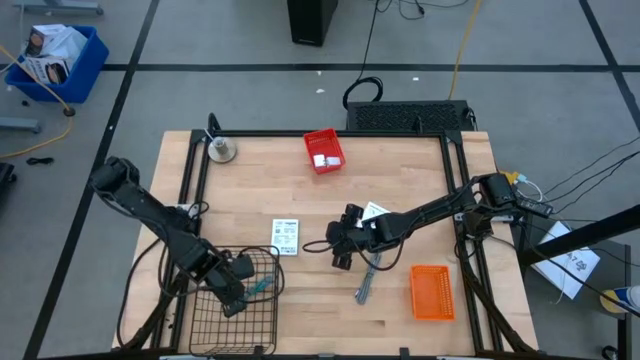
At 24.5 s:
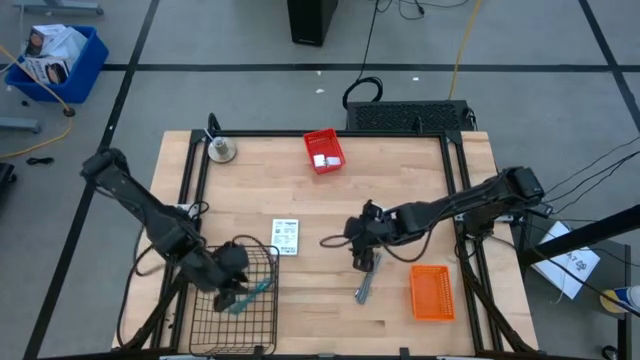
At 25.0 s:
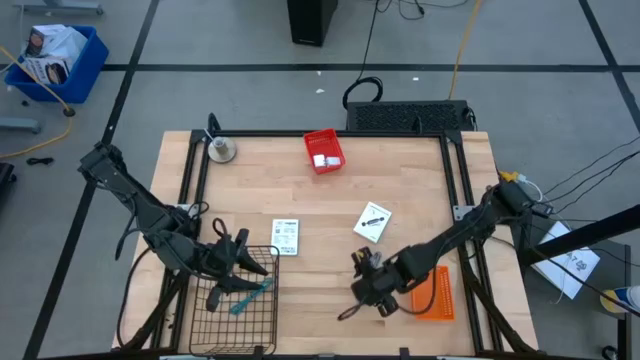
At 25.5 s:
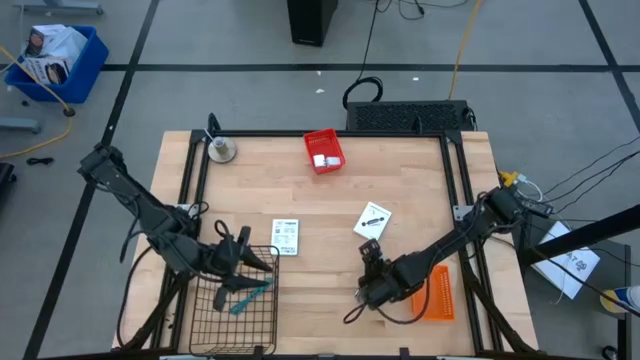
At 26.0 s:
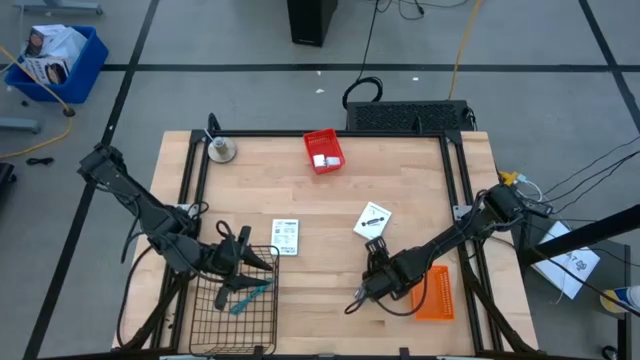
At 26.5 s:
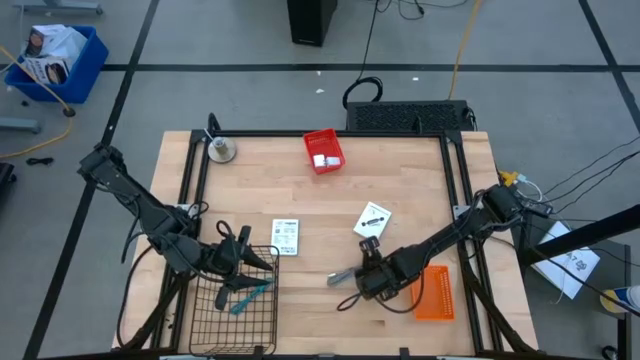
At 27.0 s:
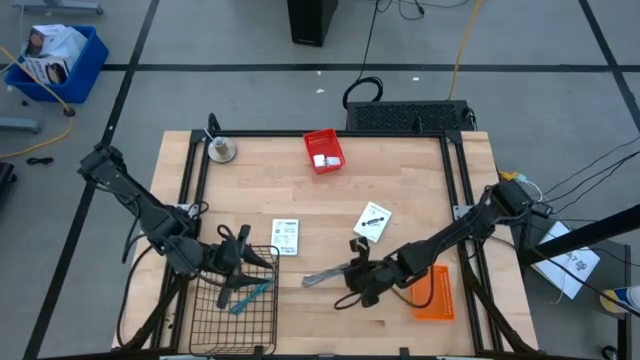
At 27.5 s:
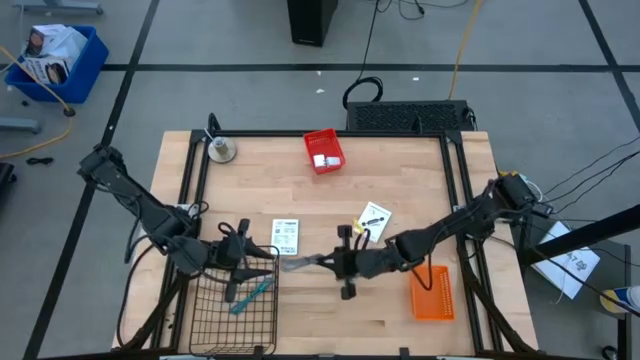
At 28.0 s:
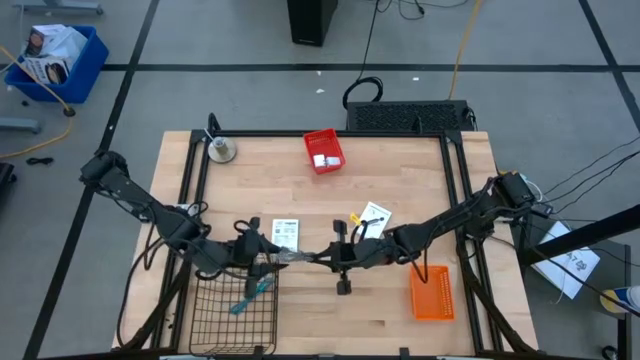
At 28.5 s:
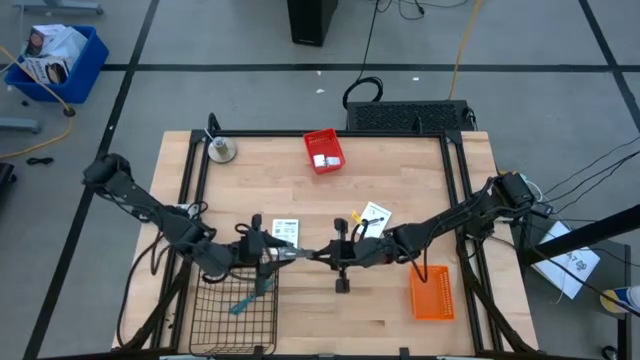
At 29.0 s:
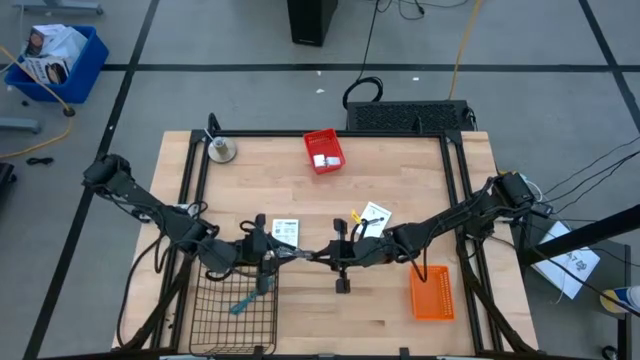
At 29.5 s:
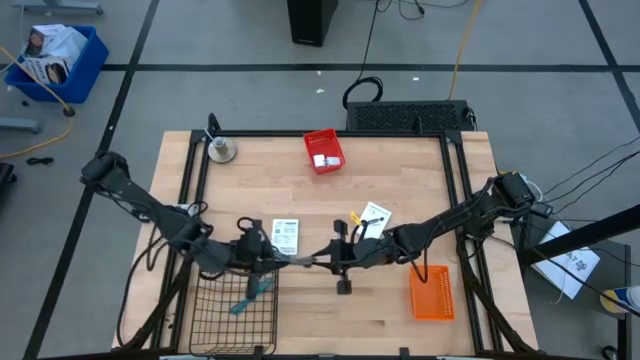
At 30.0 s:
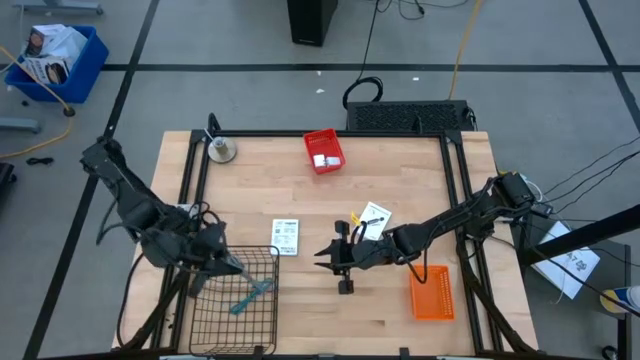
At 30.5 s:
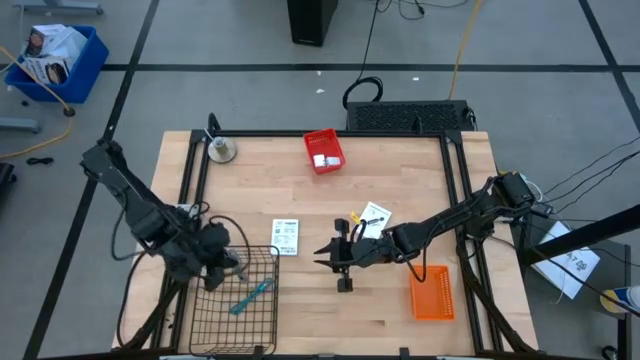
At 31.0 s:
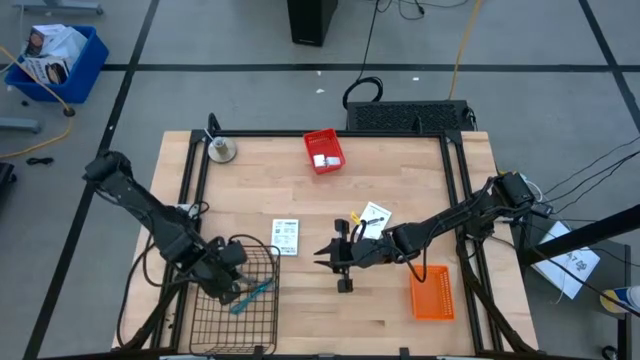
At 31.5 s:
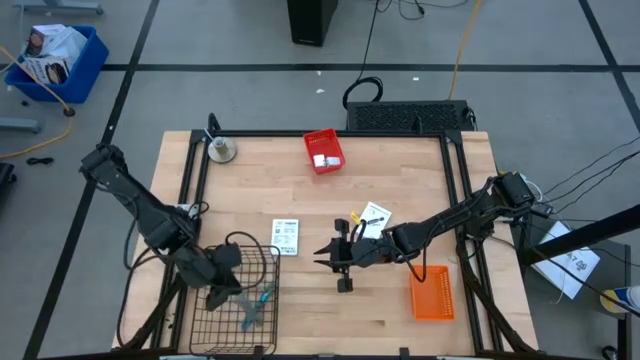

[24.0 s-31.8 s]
Task: Pick and place items into bin
Put the black stripes charger cable into the wire basket

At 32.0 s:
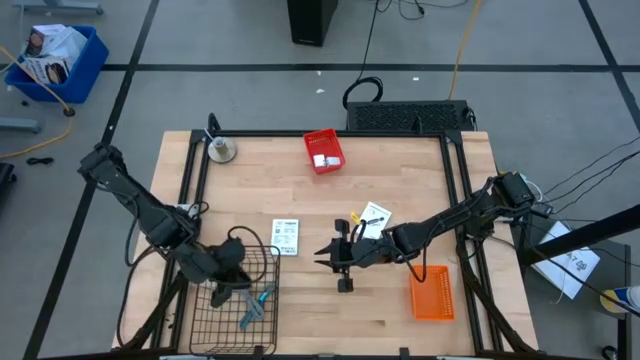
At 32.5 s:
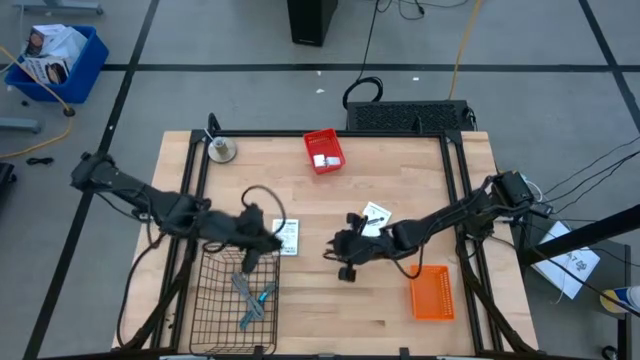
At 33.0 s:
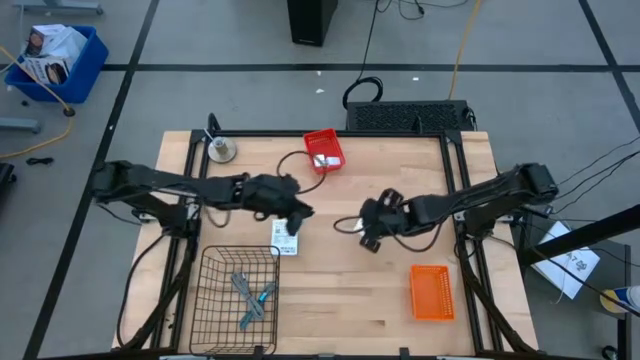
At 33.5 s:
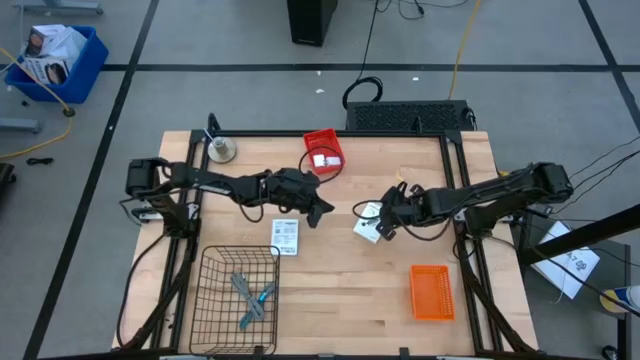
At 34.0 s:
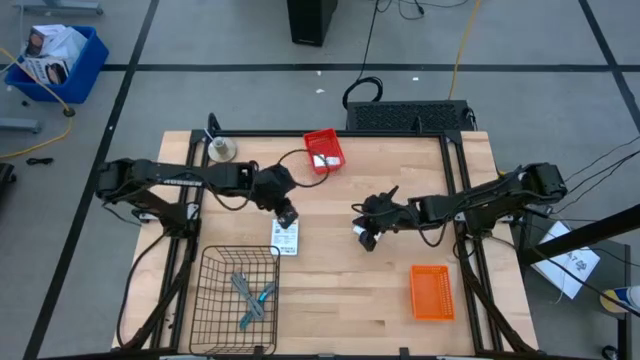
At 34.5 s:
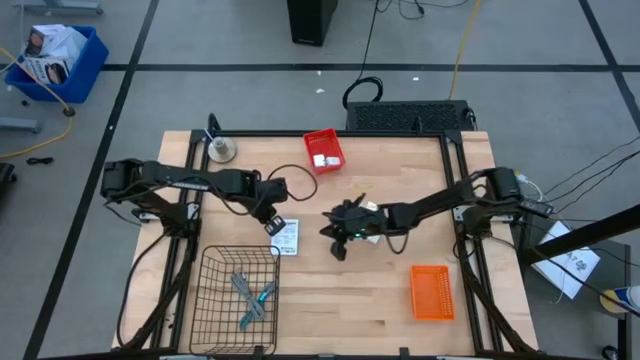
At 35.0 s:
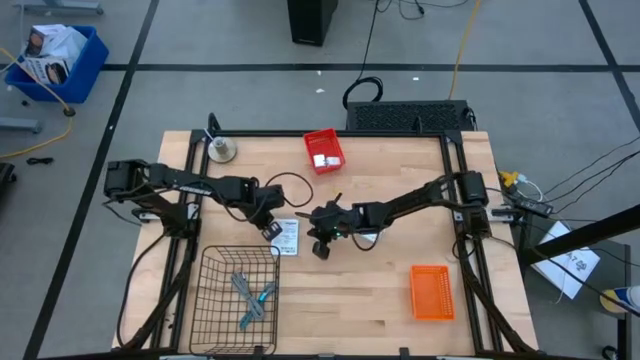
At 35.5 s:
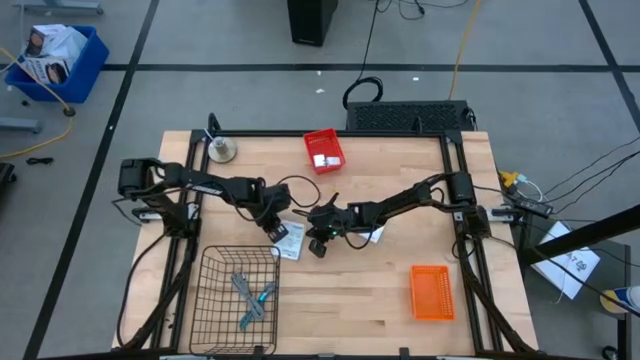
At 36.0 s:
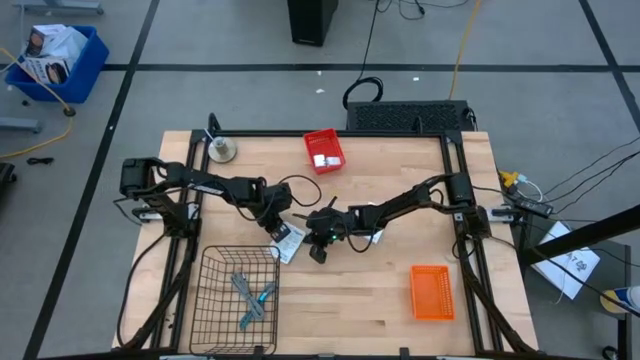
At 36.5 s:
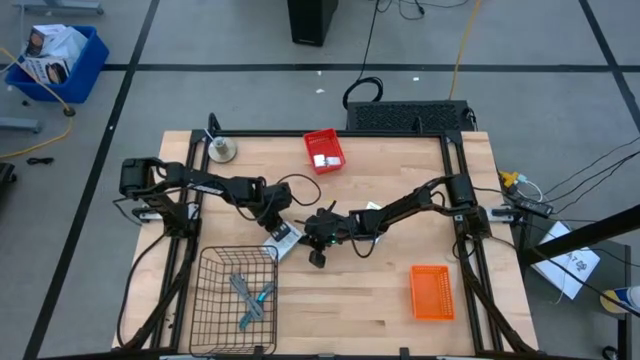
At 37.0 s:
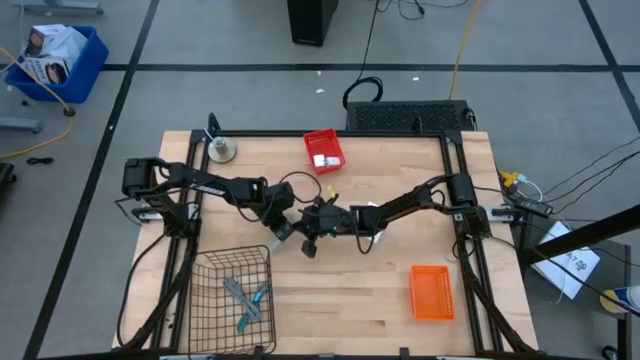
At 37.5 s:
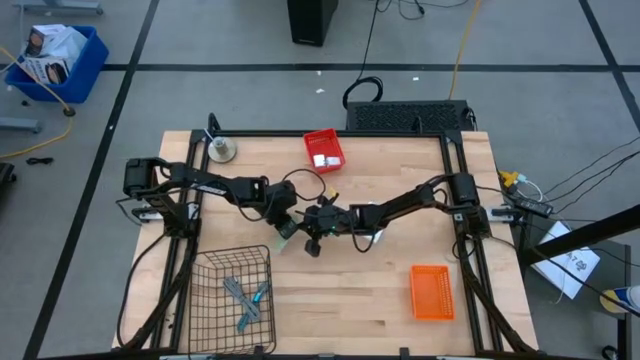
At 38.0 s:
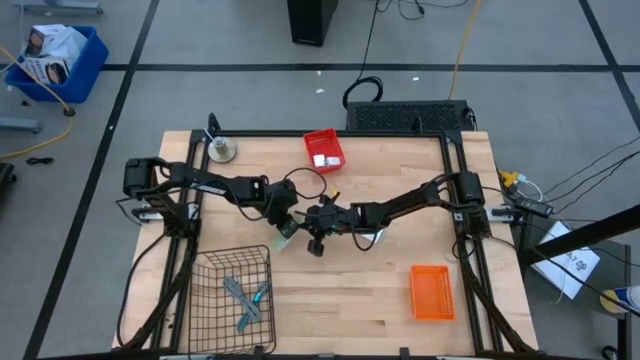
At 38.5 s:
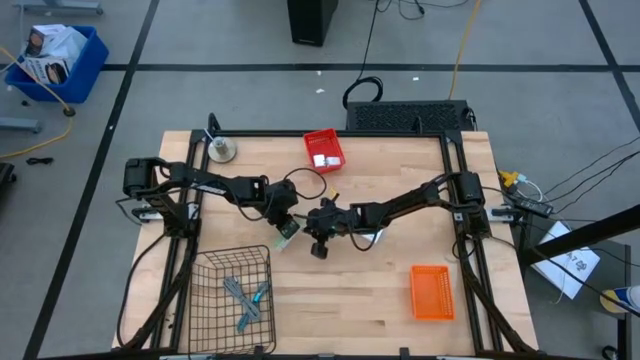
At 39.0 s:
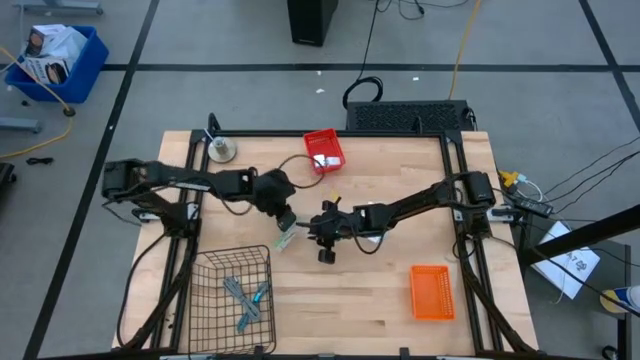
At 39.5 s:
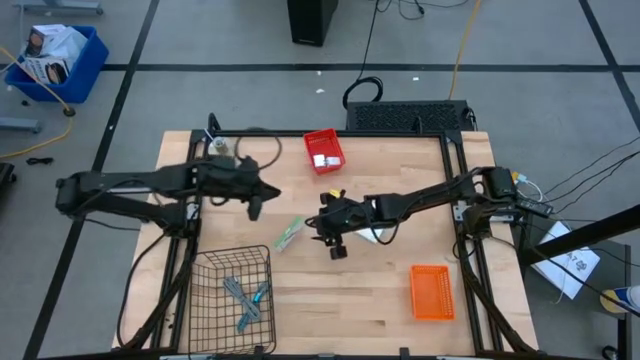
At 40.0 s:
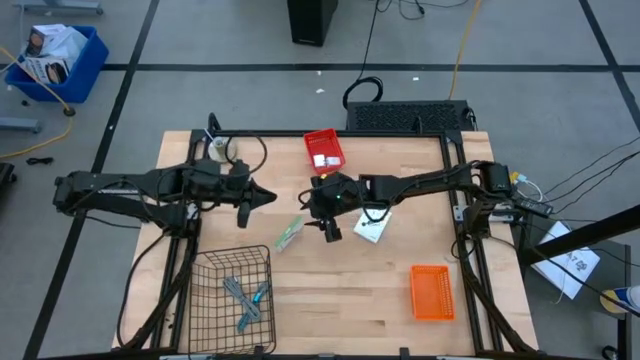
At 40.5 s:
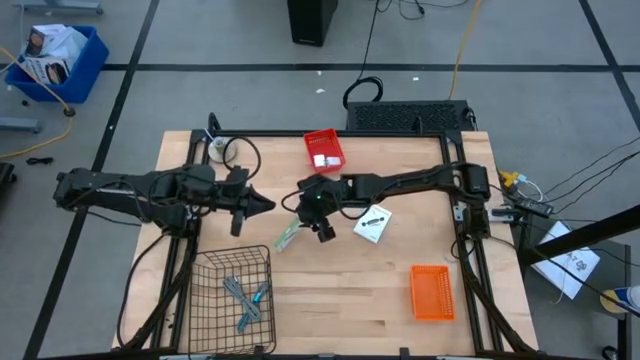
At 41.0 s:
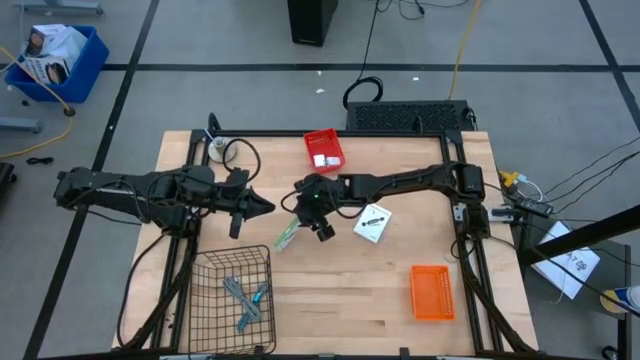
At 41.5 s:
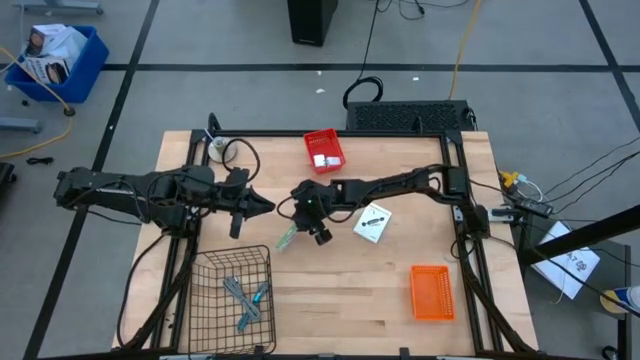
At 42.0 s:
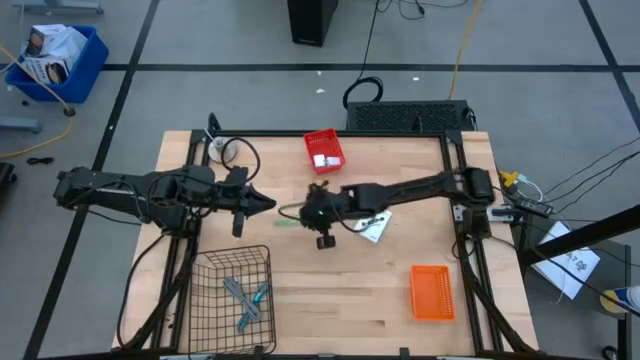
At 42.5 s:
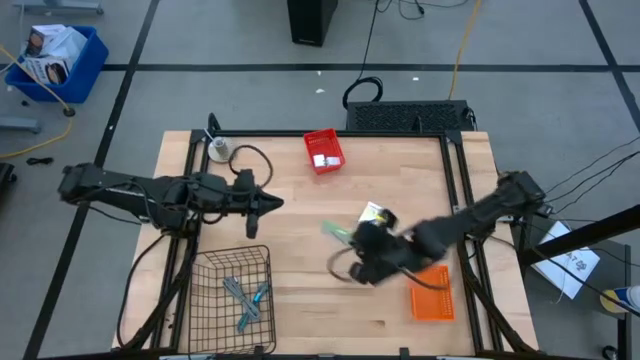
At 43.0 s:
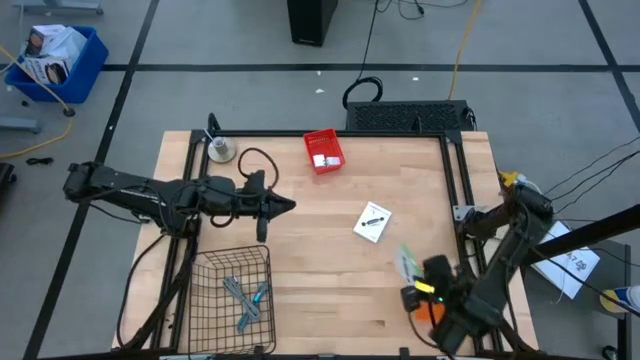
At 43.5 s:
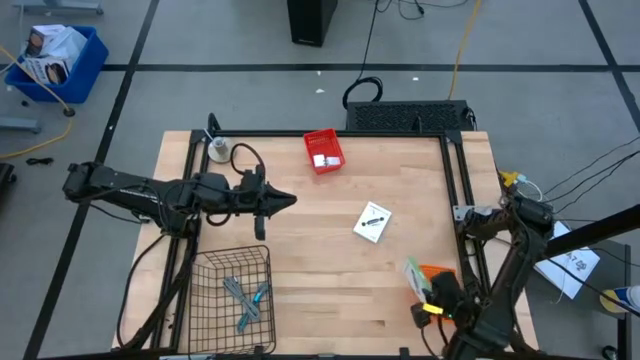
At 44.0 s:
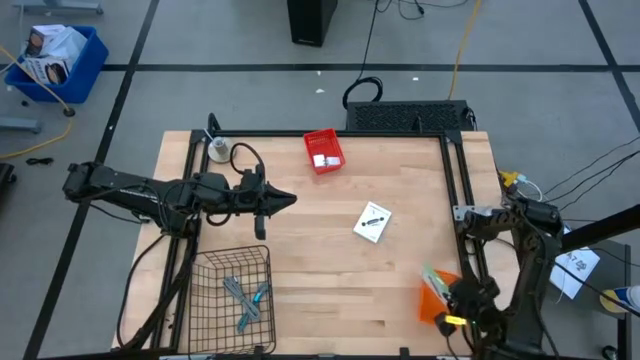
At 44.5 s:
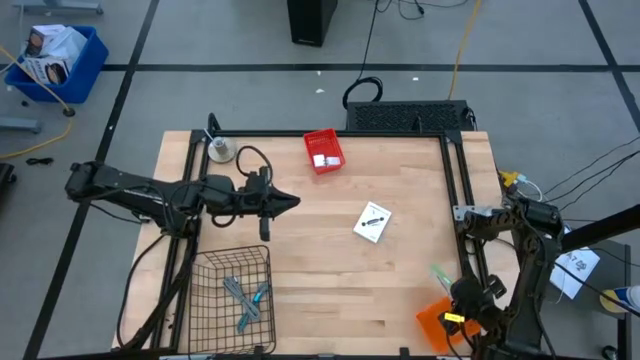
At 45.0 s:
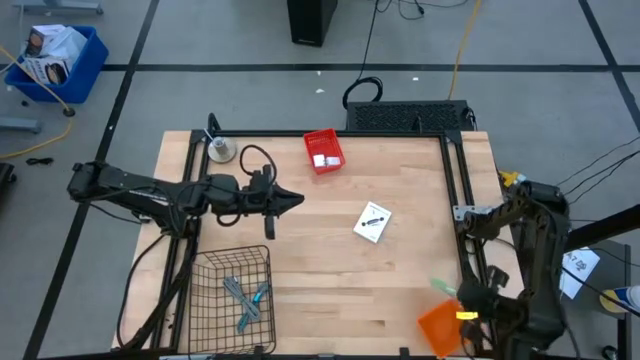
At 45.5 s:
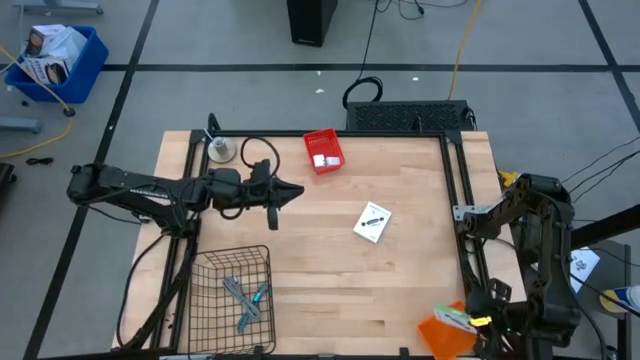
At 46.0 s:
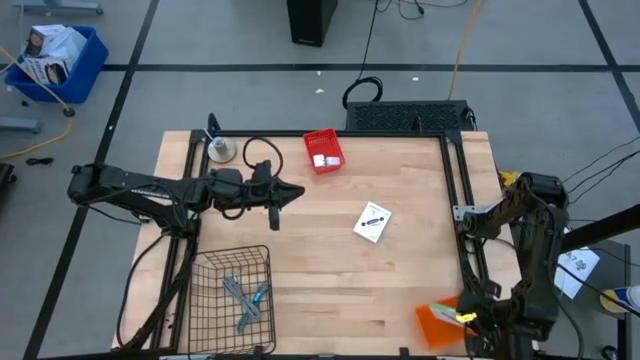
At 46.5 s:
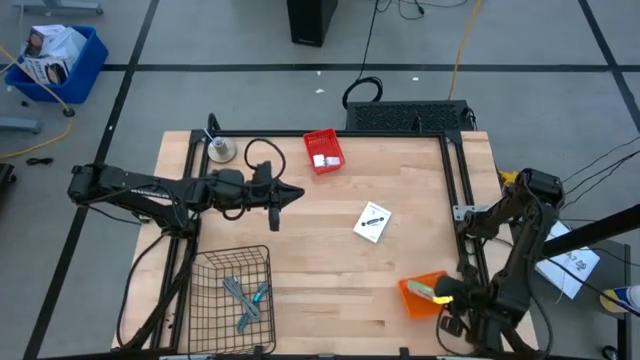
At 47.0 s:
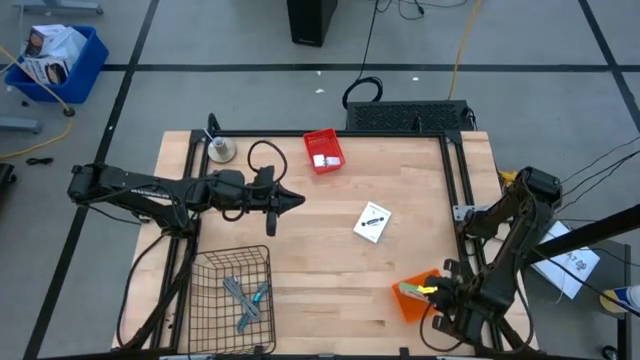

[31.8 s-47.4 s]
Put the left white card reader box into the orange basket
